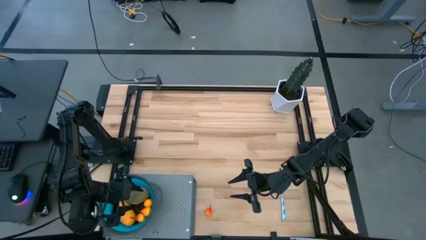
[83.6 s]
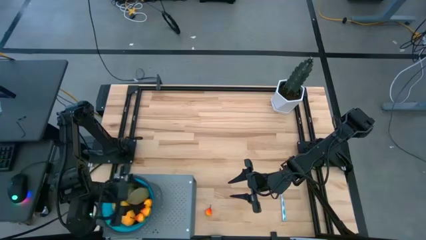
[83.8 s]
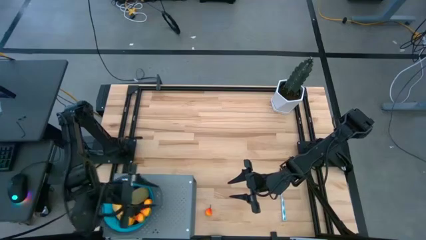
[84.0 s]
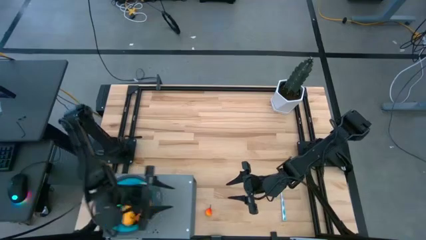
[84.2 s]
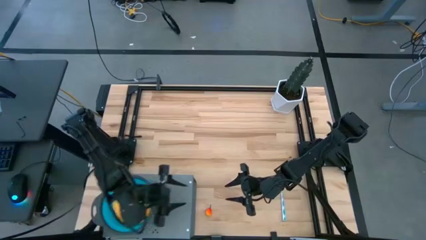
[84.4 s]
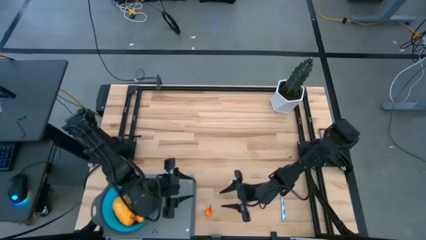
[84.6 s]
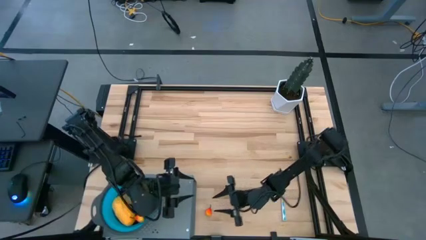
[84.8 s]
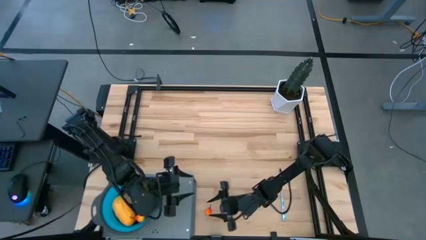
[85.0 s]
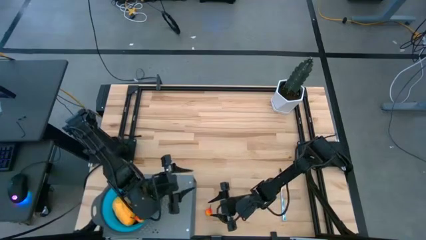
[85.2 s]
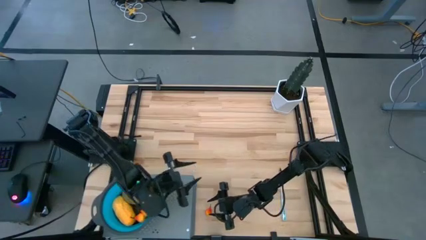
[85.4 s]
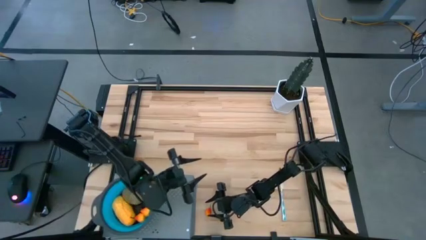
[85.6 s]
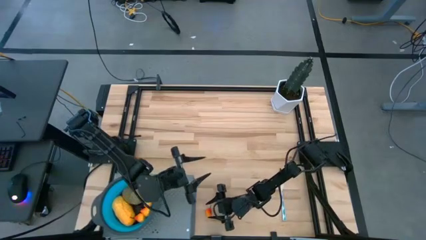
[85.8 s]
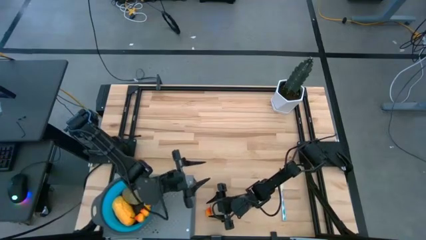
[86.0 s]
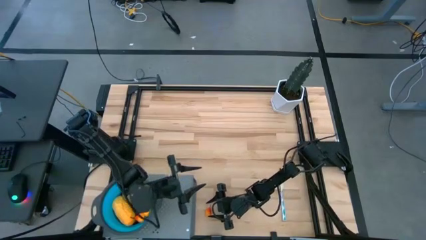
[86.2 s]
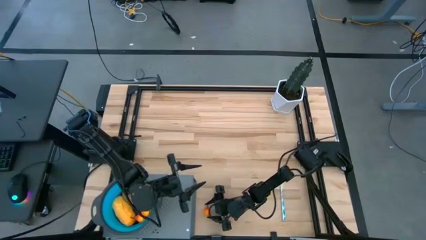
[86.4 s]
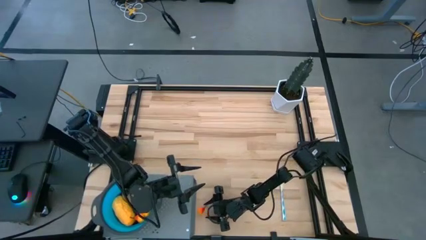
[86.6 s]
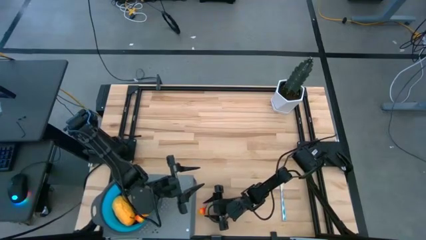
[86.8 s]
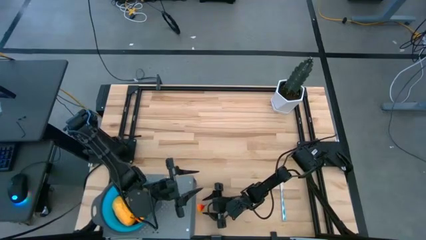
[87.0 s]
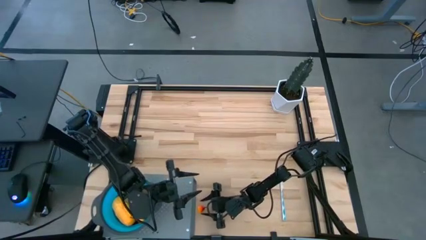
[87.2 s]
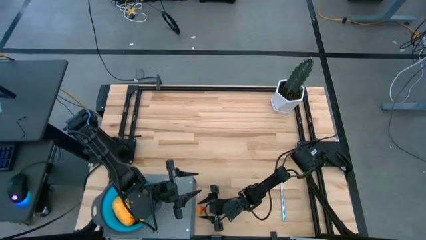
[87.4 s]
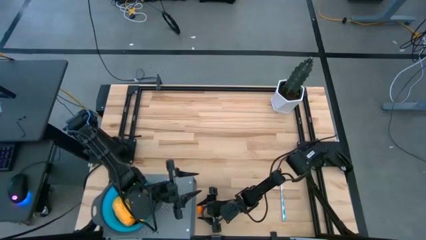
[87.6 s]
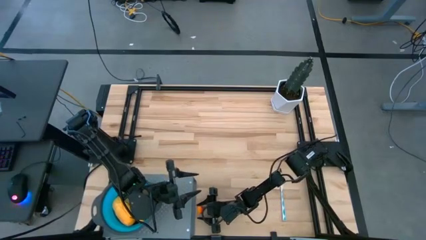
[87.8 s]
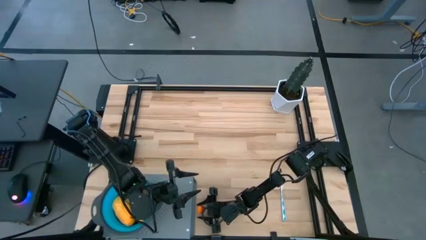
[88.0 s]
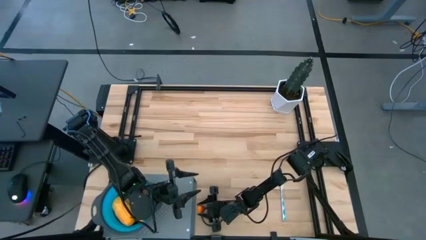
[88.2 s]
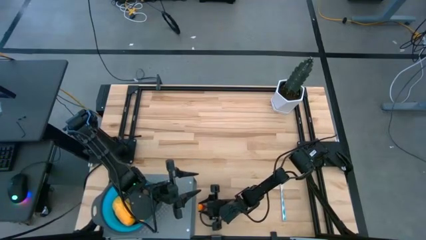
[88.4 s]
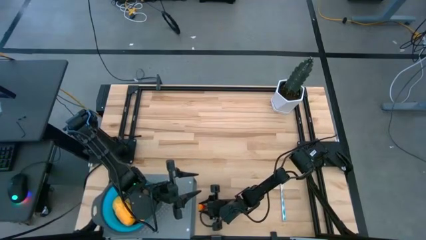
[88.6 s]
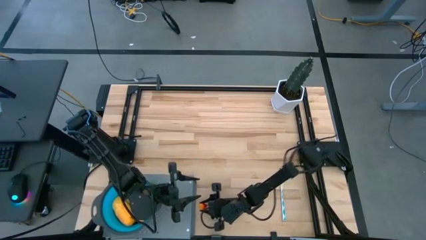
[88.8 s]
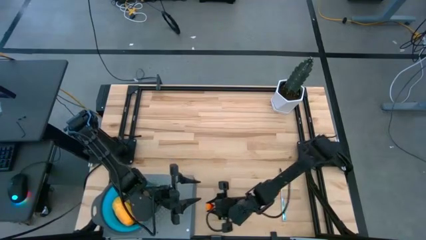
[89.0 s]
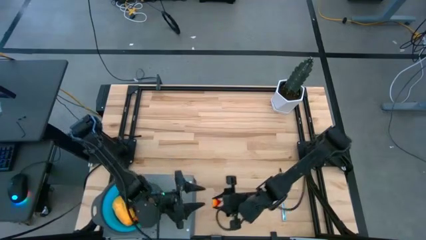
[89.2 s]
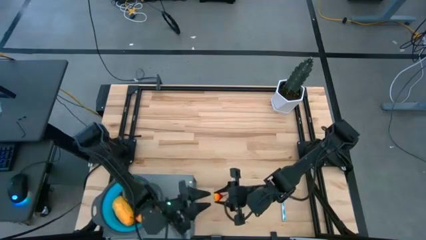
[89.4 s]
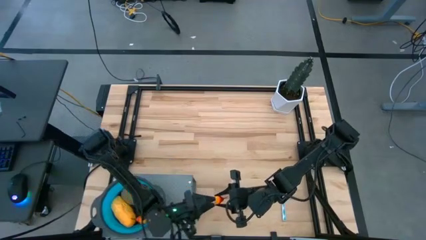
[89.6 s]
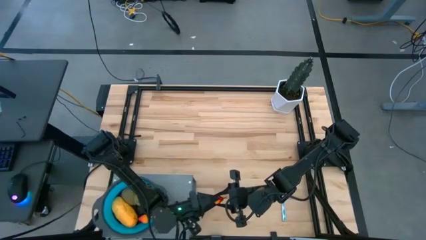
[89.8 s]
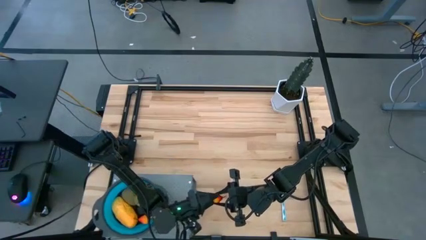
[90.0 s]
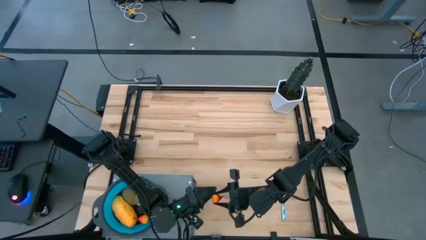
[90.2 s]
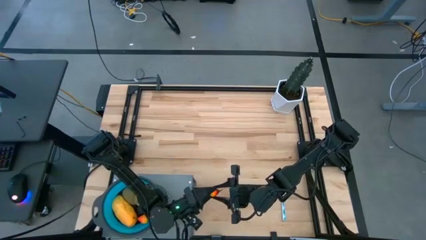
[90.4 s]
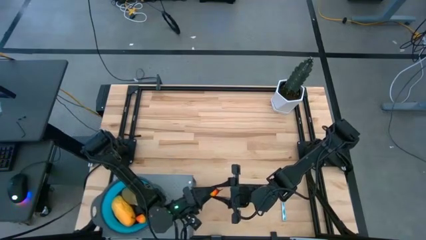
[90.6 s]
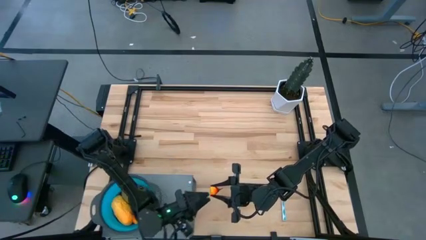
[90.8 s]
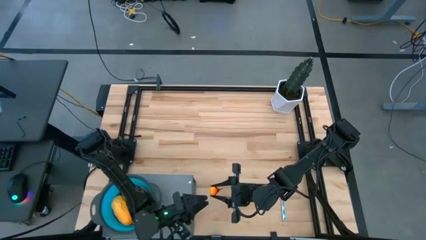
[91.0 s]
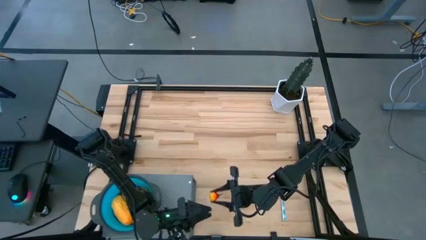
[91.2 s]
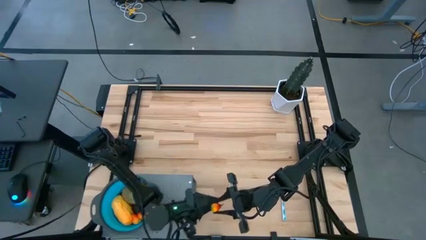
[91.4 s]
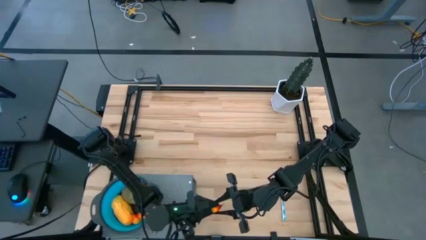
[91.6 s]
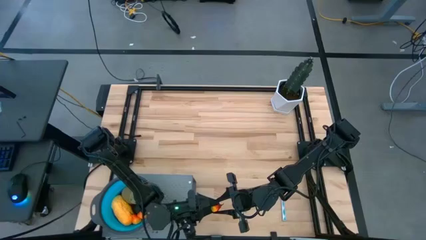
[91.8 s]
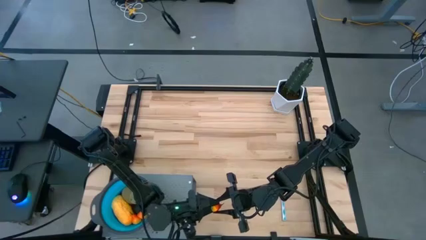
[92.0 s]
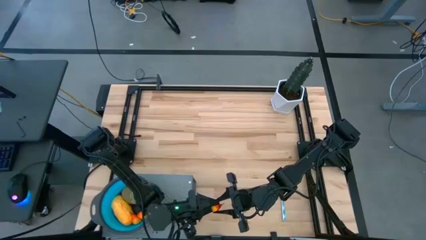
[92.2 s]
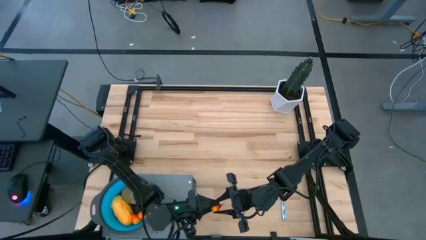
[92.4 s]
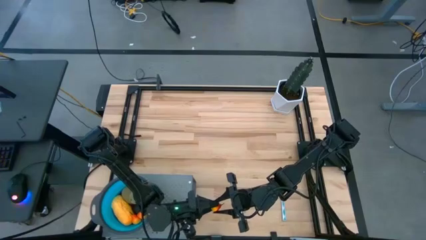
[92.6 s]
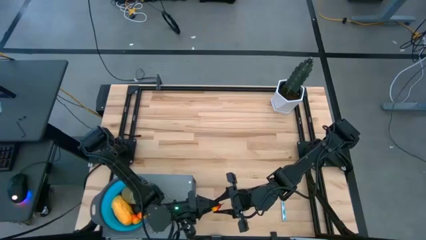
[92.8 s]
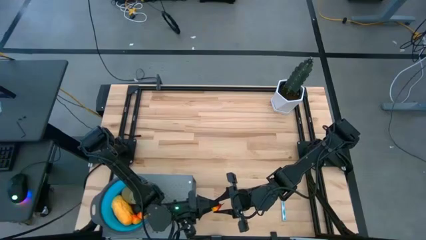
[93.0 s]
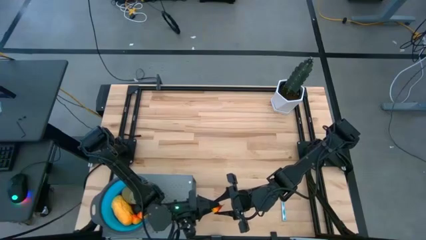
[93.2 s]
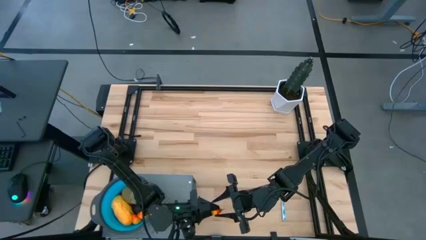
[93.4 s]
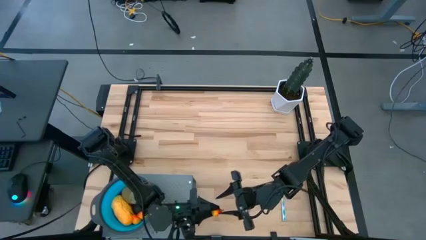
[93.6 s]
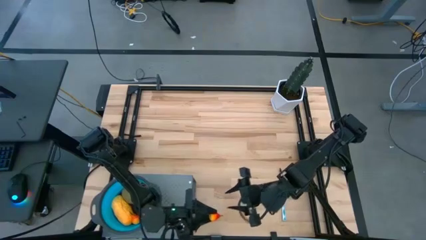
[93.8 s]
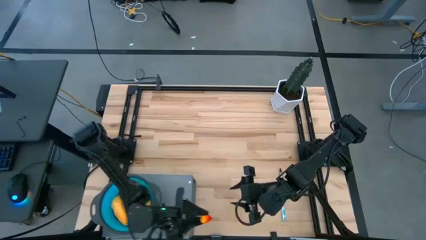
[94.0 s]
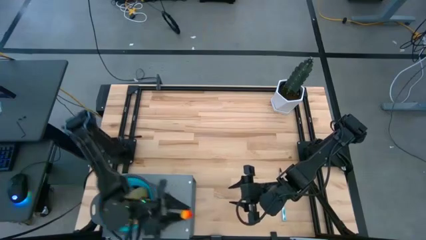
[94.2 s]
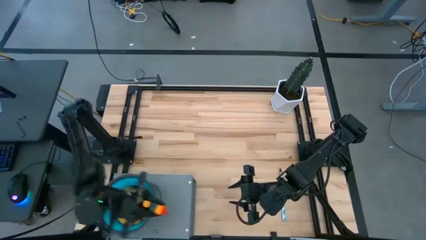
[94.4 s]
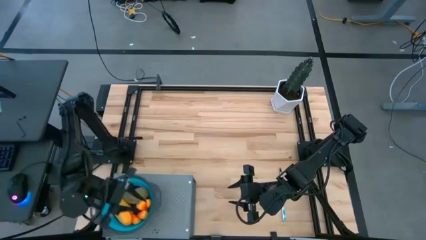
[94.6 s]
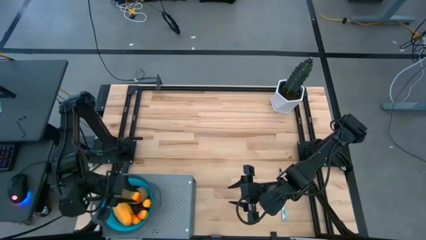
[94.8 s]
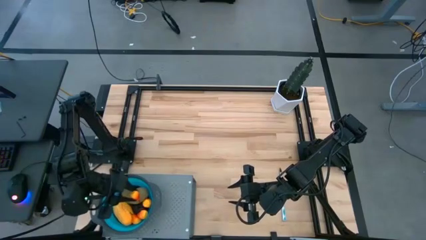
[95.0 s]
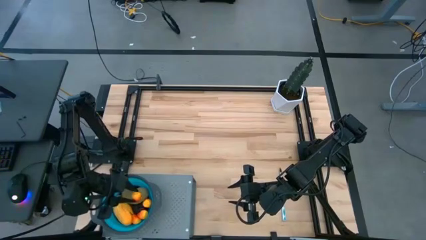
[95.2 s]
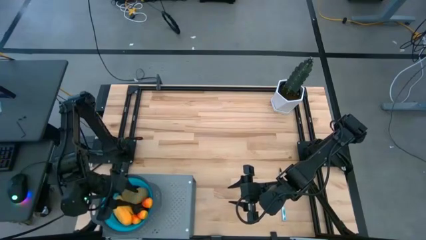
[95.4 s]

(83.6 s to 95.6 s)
Task: Pick & Place Fruit
Put the pear into the strainer bowl

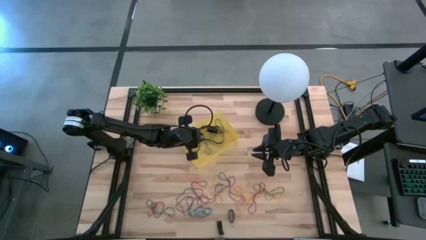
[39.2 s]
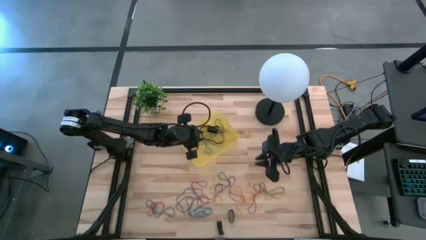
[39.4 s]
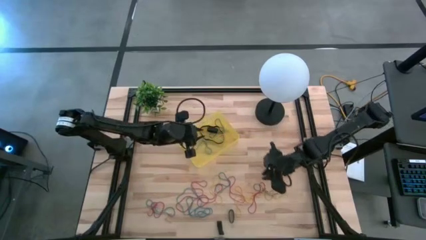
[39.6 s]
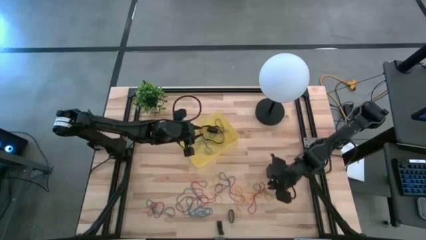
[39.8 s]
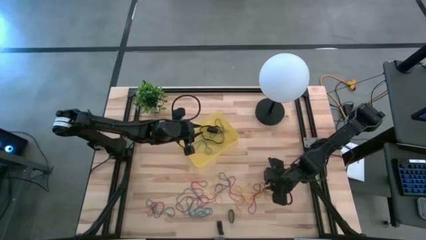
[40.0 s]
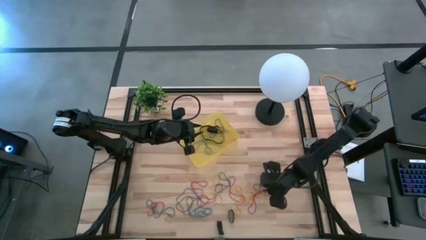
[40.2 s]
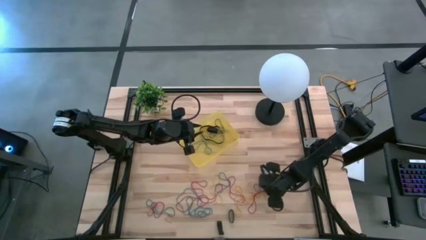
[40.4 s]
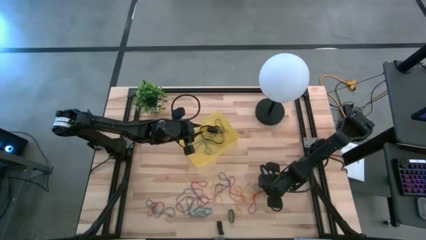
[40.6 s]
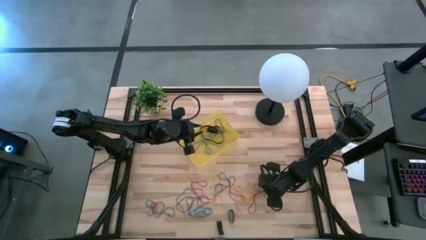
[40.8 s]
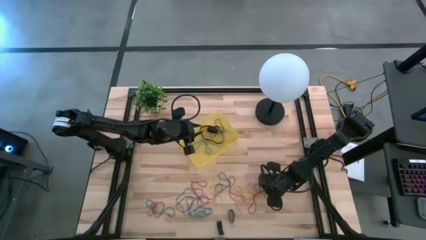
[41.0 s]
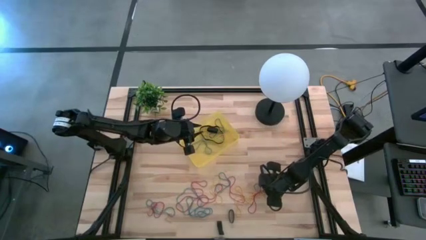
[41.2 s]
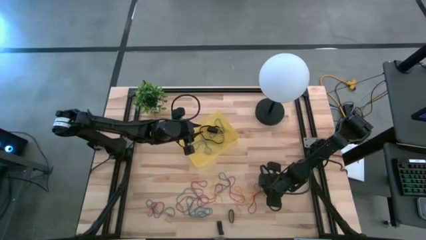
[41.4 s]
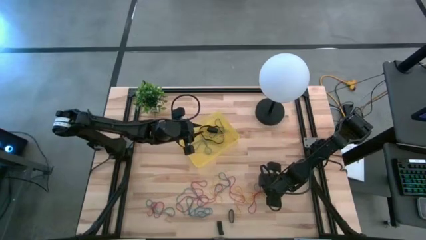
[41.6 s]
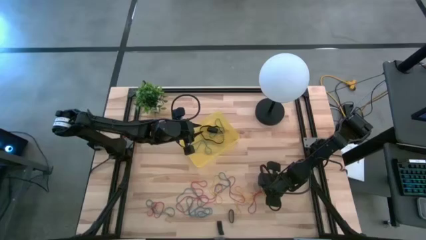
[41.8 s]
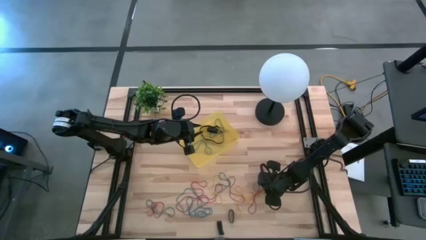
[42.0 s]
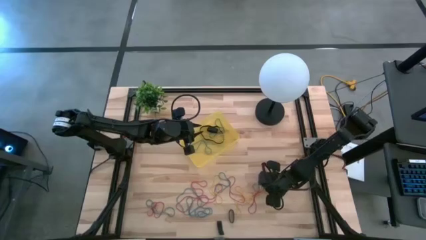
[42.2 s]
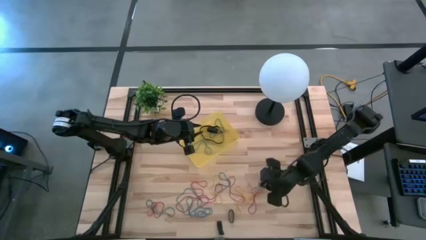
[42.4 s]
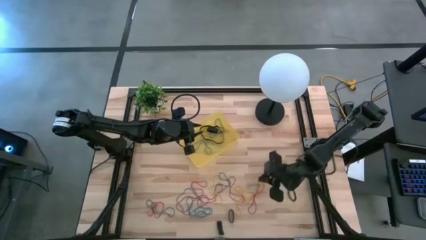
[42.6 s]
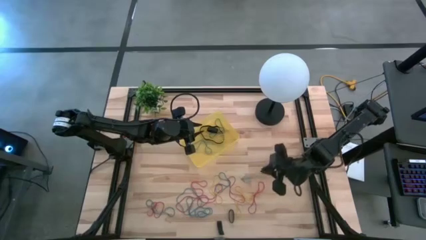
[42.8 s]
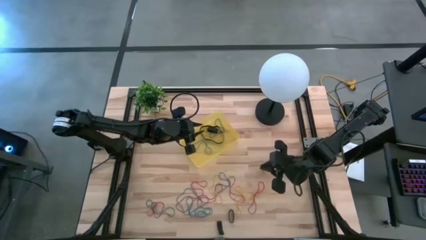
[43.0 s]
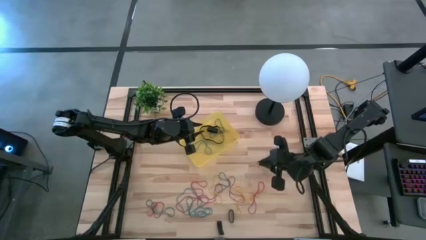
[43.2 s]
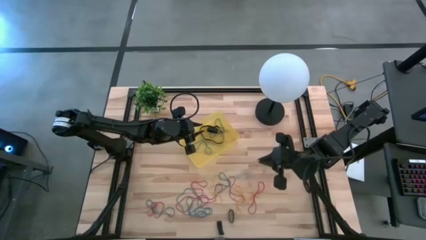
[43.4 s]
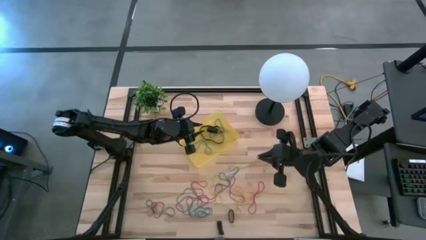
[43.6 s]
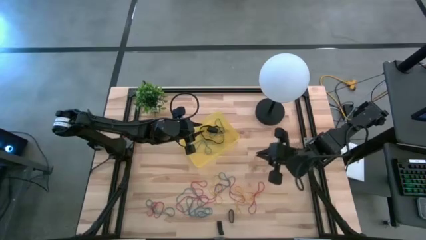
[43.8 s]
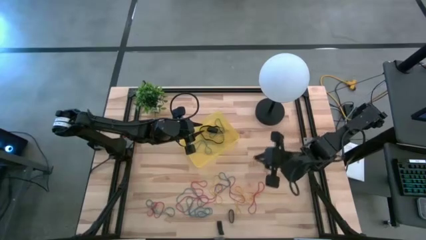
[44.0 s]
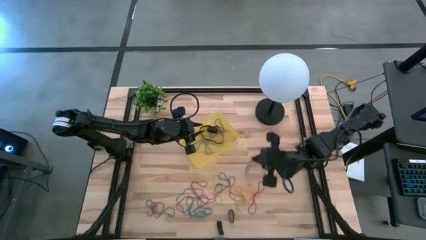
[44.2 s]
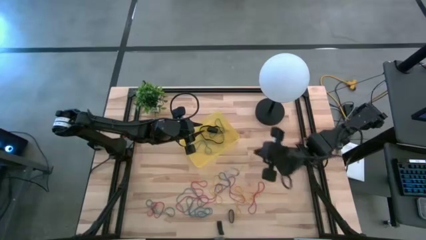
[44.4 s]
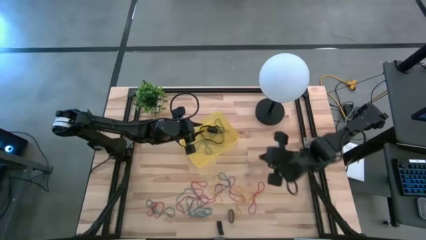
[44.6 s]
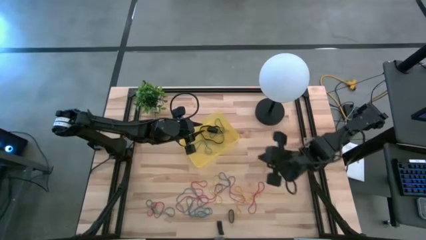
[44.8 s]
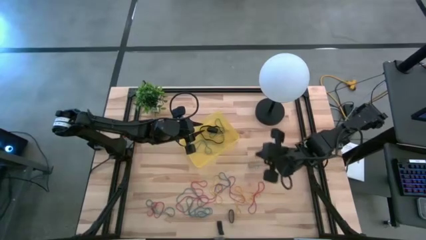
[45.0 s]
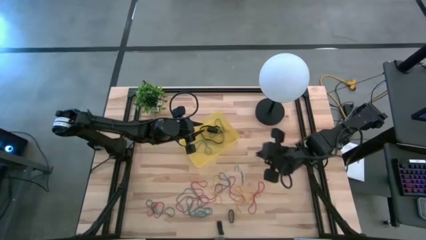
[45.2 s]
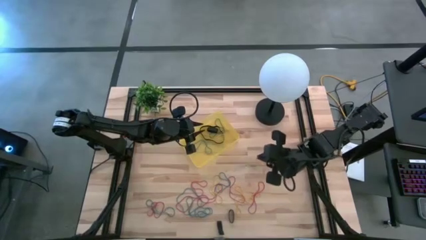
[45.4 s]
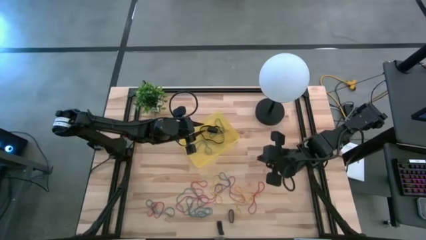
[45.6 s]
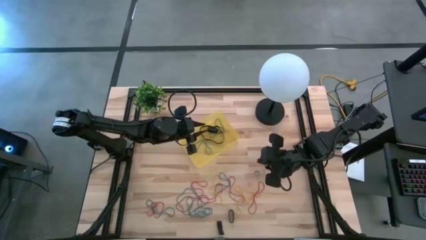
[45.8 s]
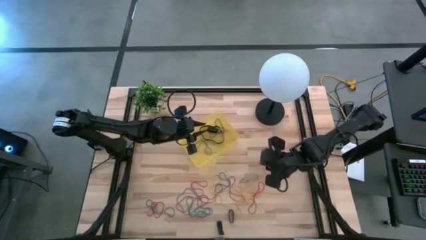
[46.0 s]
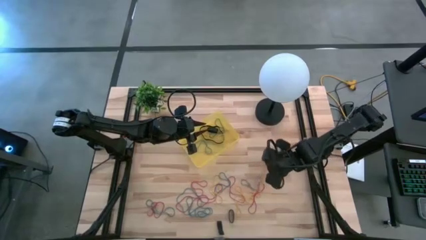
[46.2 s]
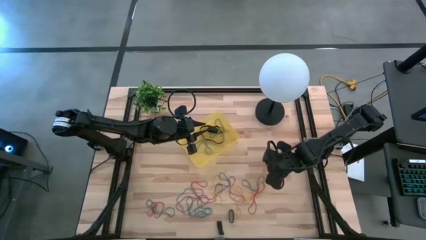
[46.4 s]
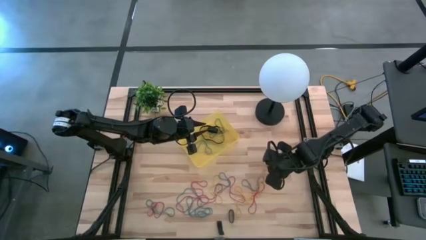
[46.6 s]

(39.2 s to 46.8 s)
Task: Pick and place rubber bands into bin
Put the yellow rubber band into the yellow bin
